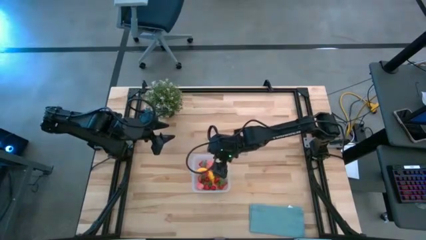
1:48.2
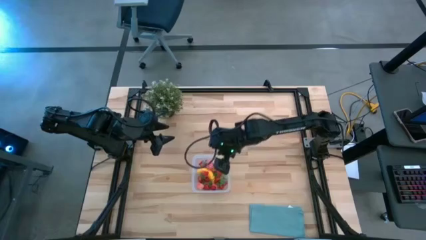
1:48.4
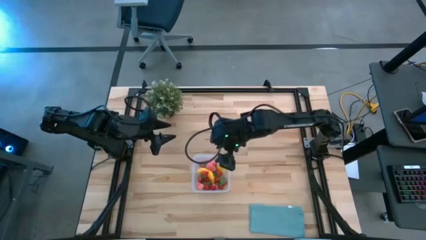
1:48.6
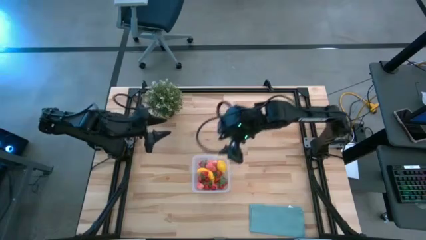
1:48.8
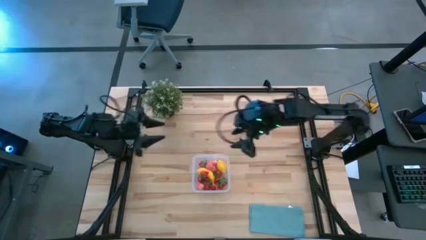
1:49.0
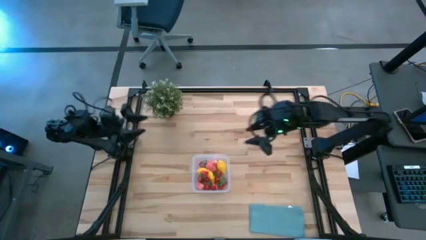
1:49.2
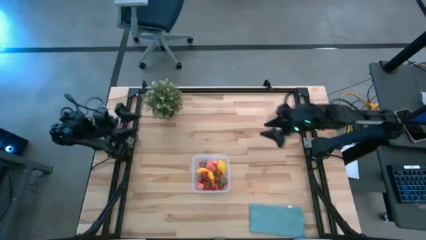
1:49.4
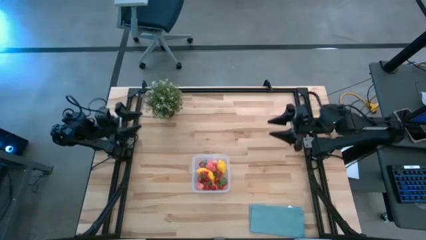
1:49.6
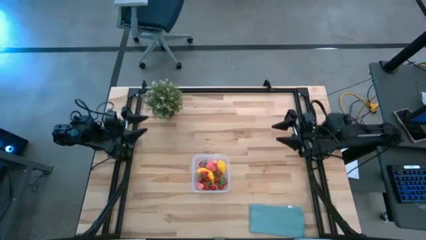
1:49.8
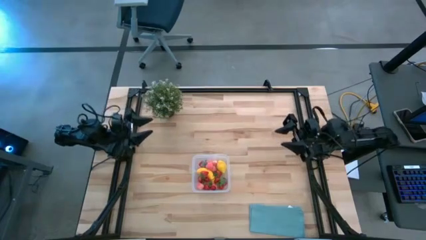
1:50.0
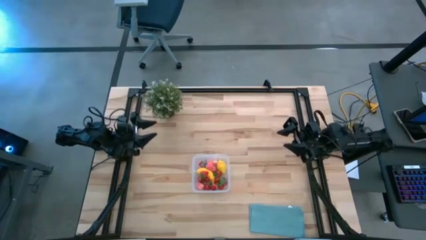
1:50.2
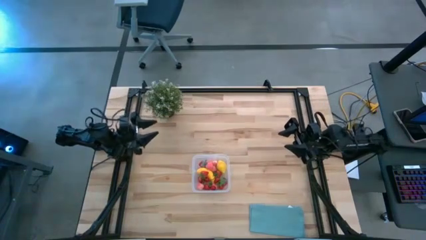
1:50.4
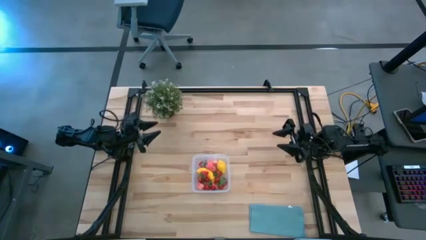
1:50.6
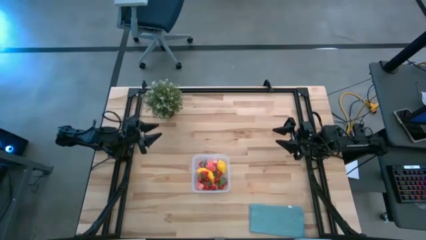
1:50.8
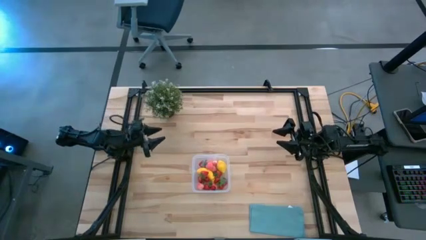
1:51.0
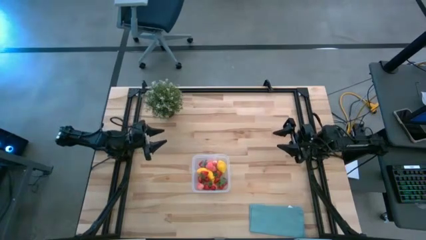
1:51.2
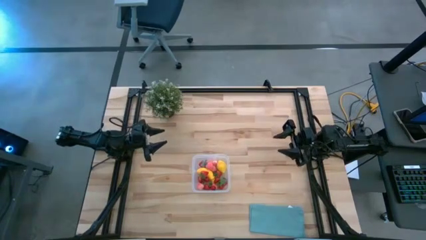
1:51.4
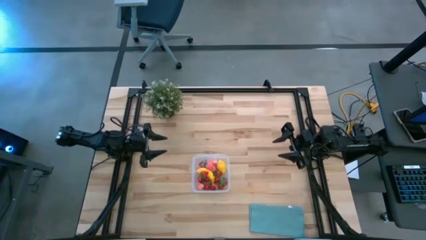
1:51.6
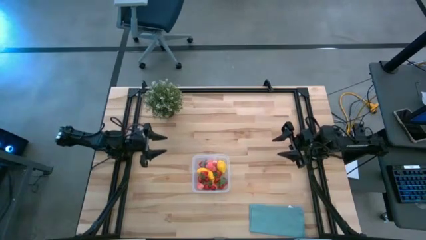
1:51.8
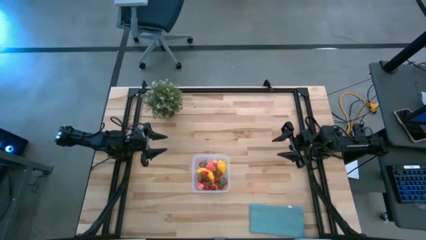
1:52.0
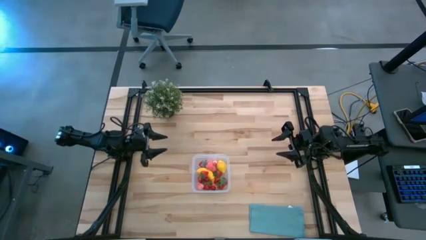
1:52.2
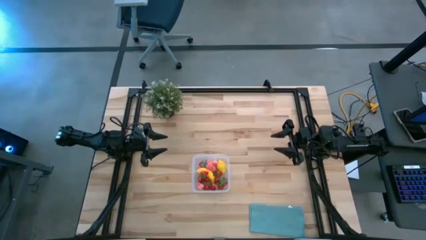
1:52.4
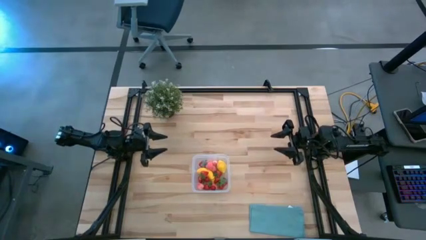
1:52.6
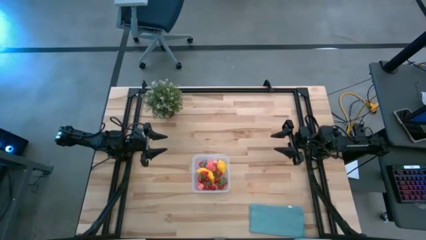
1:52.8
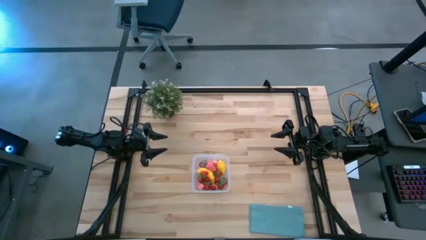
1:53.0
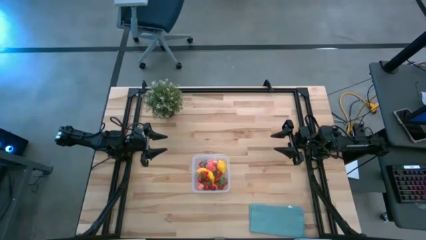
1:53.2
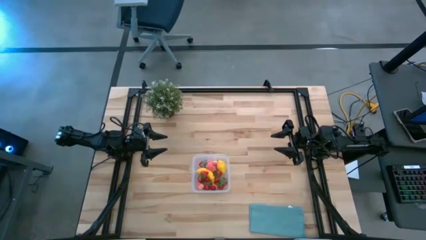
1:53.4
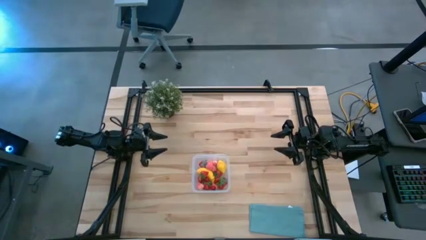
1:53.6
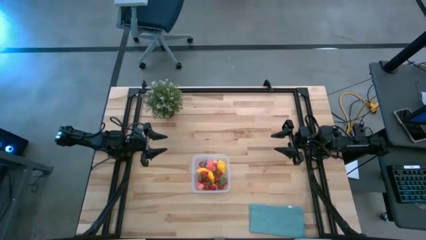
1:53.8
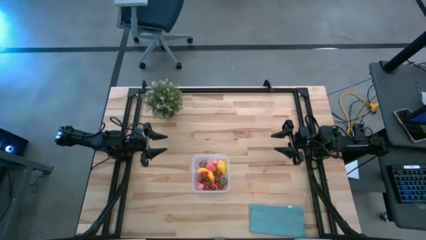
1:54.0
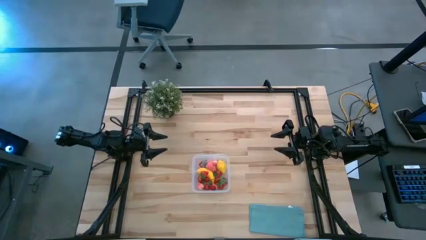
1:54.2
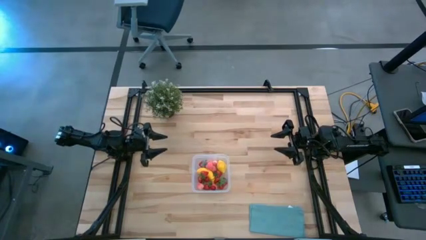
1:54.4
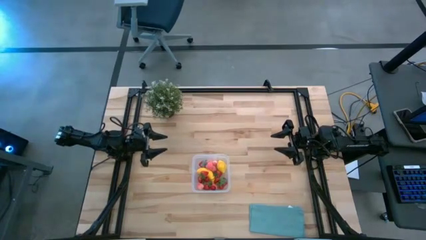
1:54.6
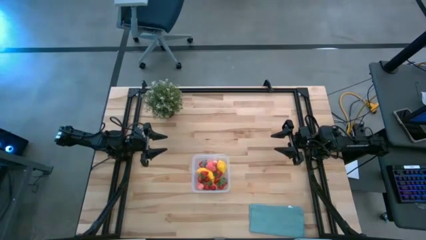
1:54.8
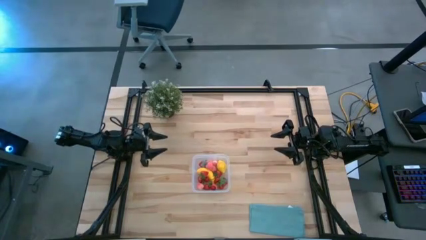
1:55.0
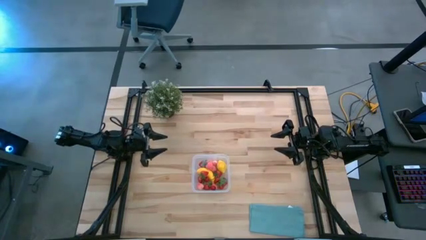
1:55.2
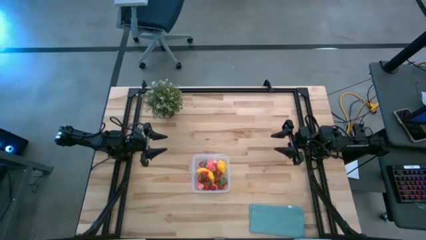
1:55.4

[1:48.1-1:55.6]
Task: Pick and placing Produce into tupperware
Return to Home Position

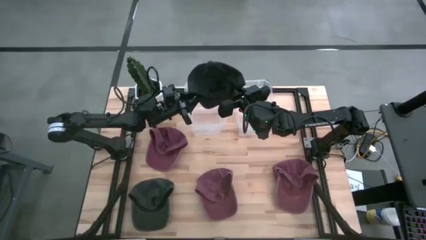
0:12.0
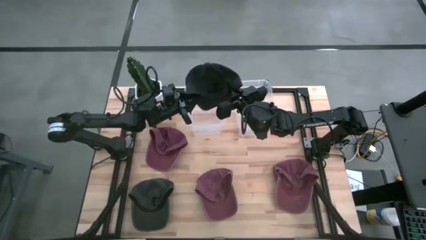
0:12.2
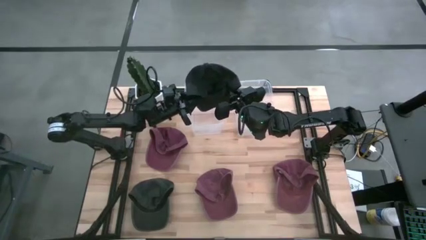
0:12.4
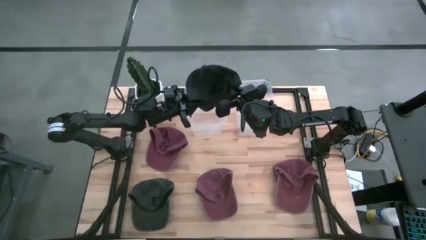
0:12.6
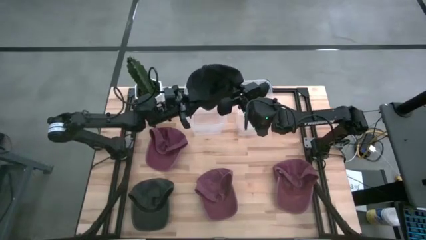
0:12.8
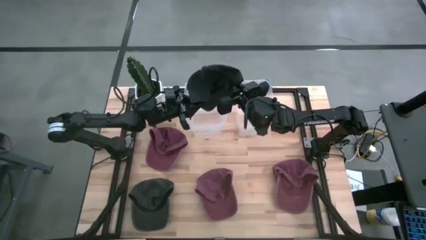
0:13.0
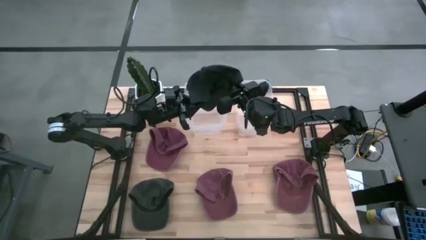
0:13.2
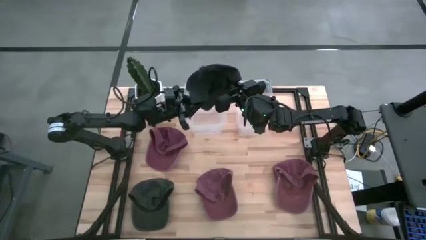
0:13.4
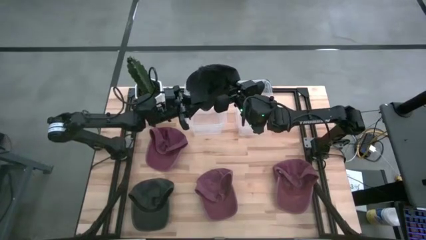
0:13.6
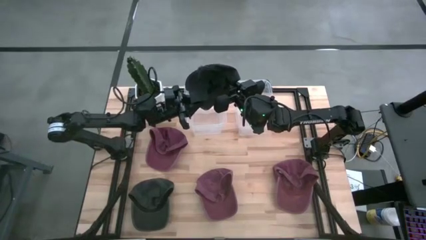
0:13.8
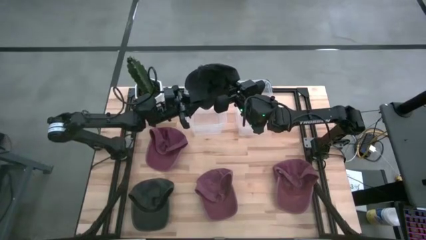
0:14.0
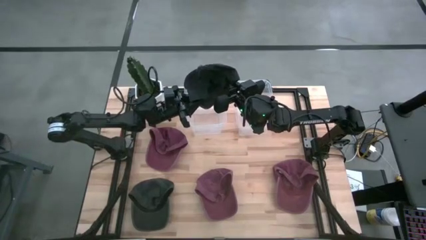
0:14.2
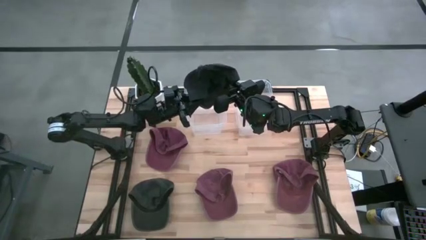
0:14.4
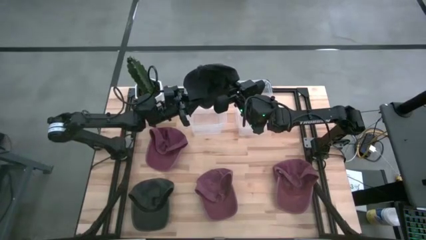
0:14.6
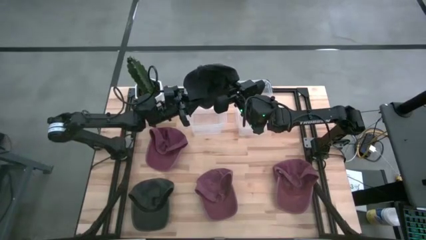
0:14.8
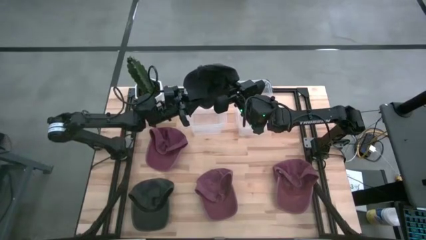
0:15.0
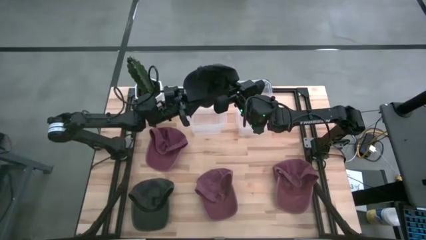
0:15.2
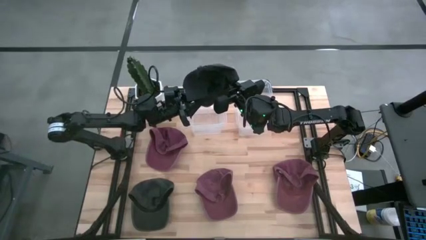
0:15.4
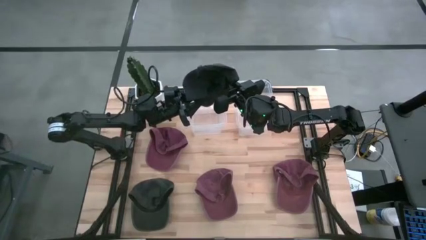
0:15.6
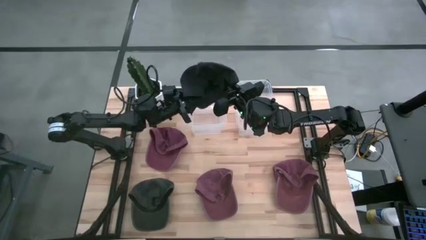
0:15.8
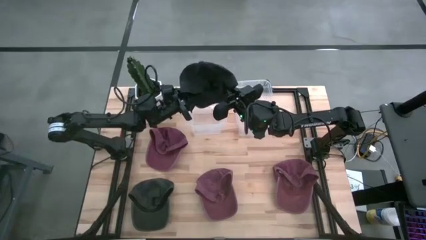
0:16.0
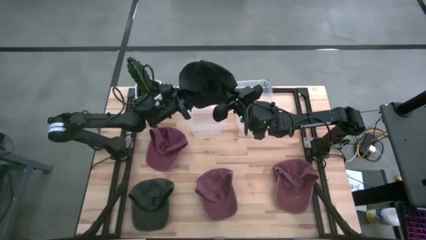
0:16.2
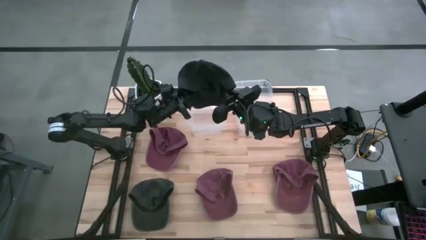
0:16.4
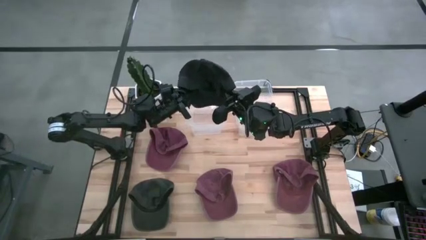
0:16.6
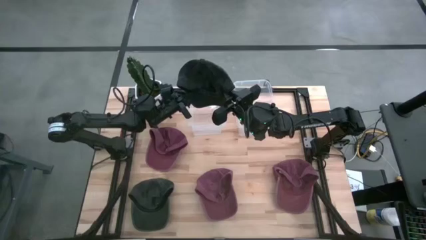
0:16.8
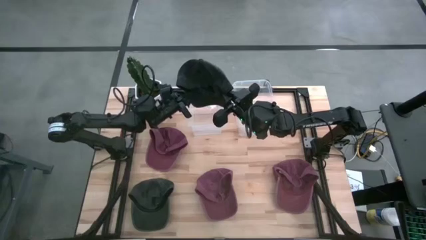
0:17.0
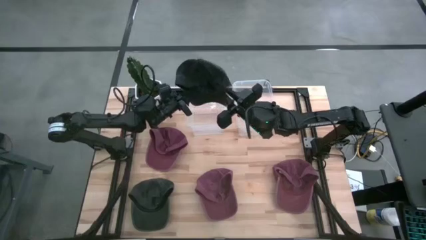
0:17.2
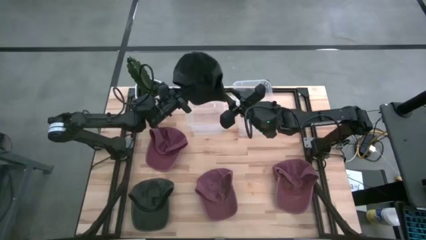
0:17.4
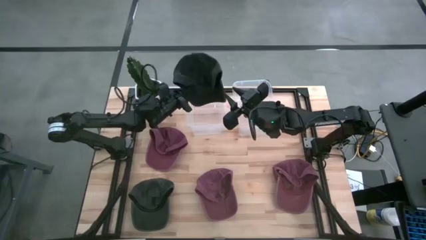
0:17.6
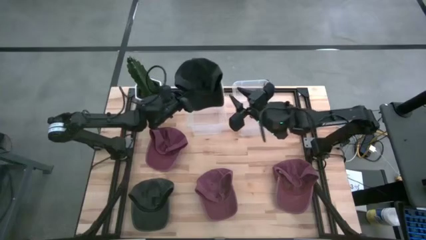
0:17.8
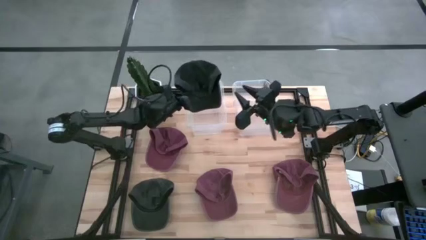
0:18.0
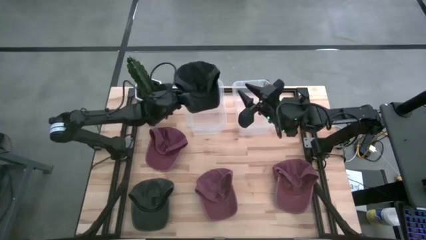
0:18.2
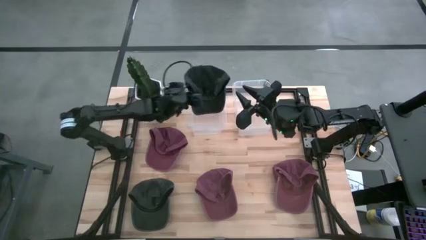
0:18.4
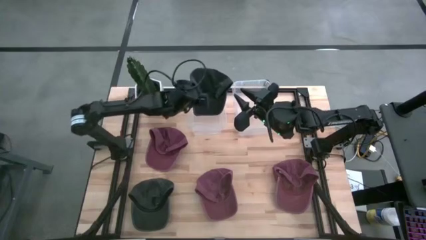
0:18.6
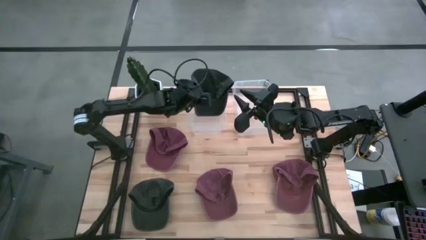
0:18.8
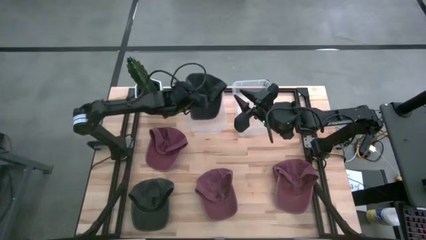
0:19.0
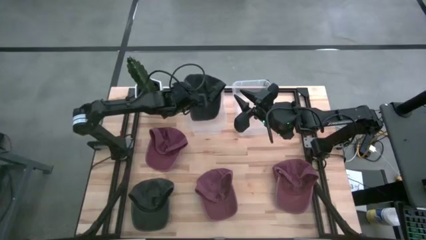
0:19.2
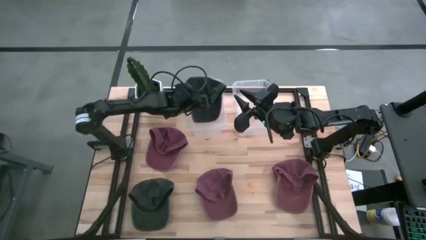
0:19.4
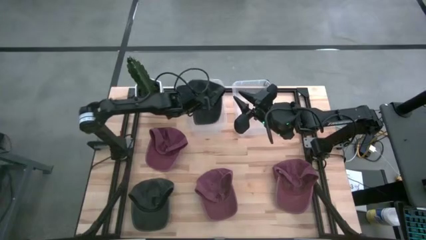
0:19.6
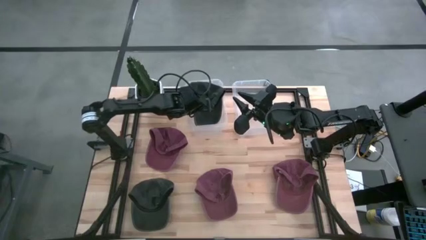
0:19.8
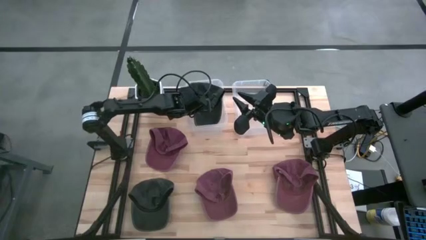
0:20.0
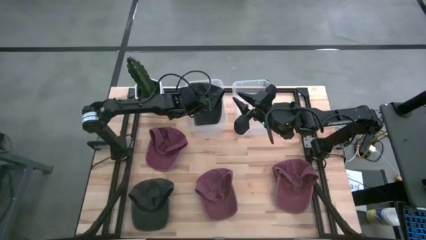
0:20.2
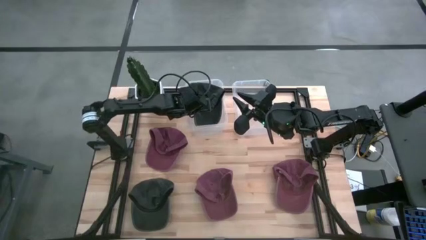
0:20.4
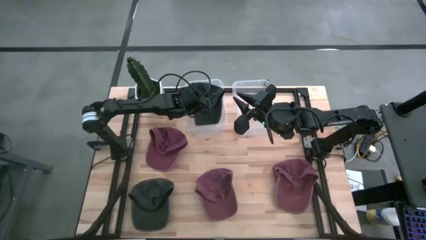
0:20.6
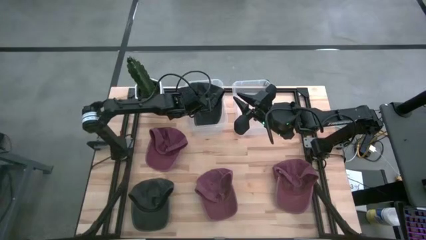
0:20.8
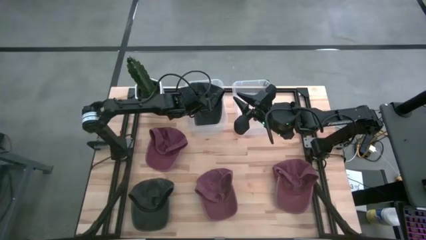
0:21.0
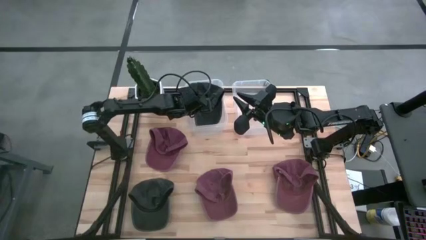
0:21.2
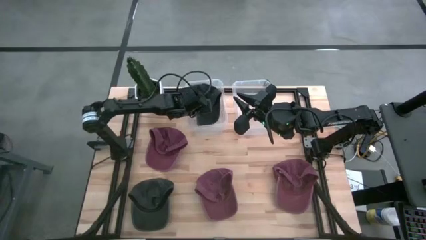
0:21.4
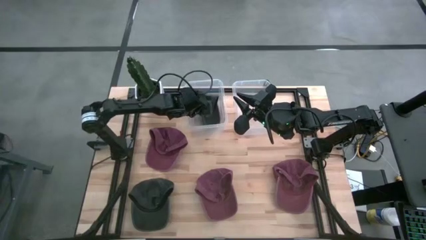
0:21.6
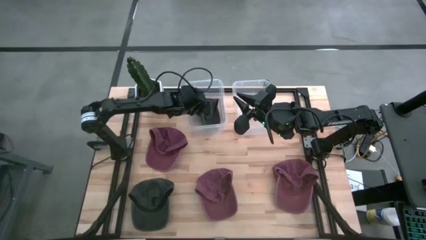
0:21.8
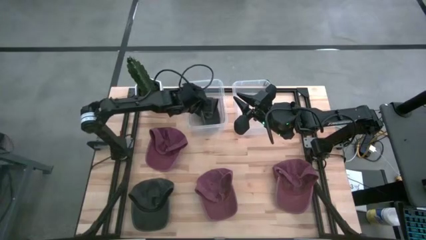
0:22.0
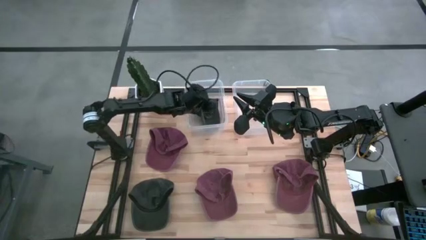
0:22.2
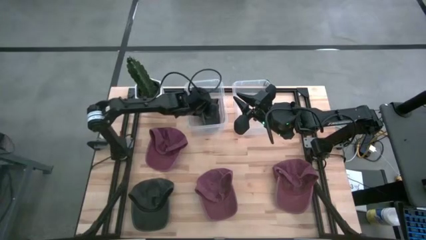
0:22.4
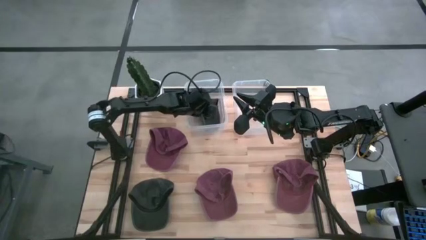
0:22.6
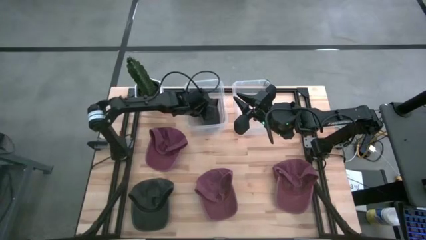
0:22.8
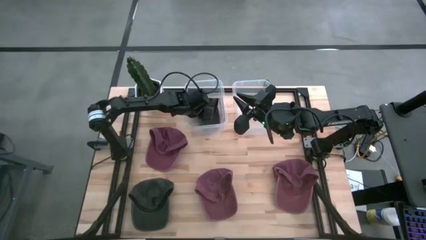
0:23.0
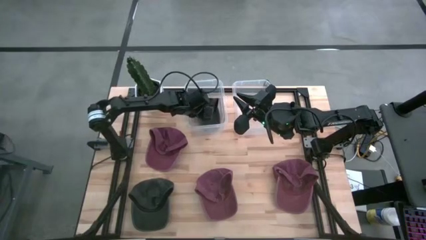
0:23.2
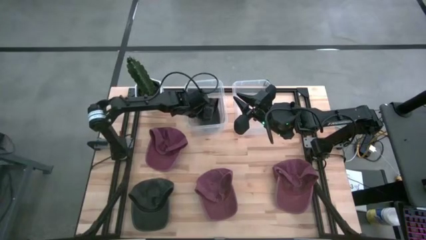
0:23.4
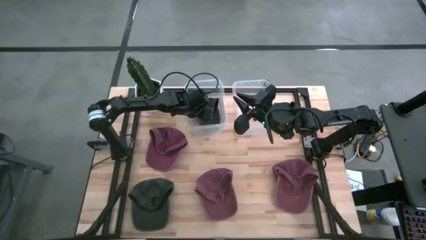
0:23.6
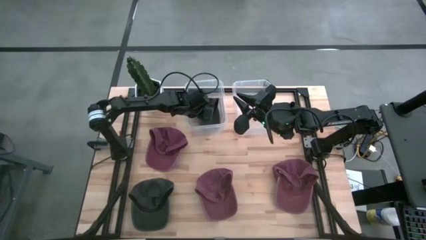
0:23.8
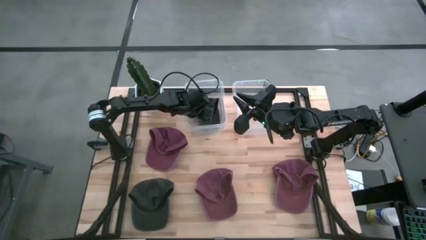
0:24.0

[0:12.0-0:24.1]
Task: Pick & Place hat
Put the right gray cap into the left transparent bin
